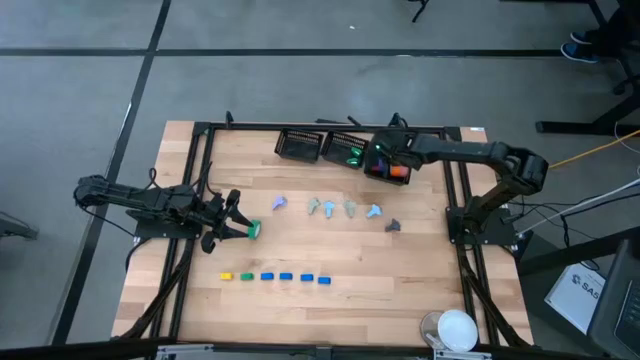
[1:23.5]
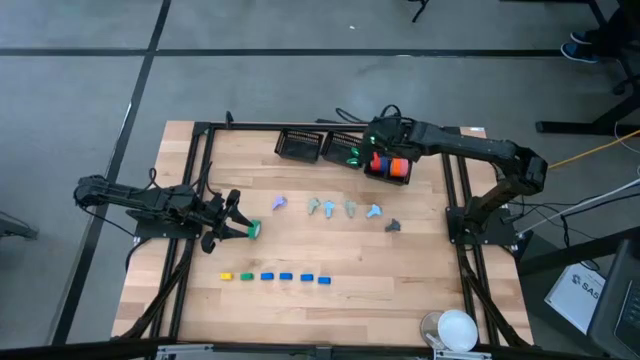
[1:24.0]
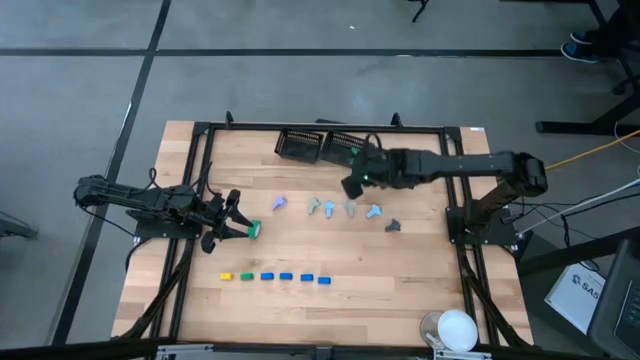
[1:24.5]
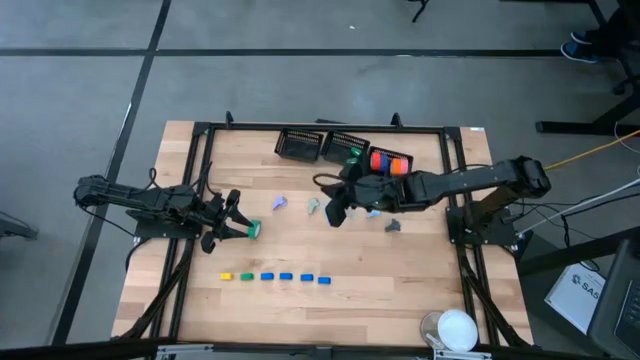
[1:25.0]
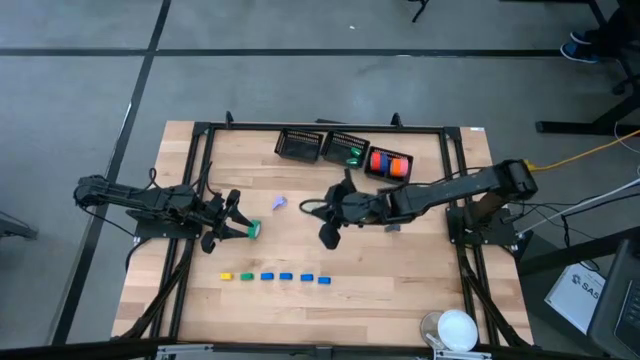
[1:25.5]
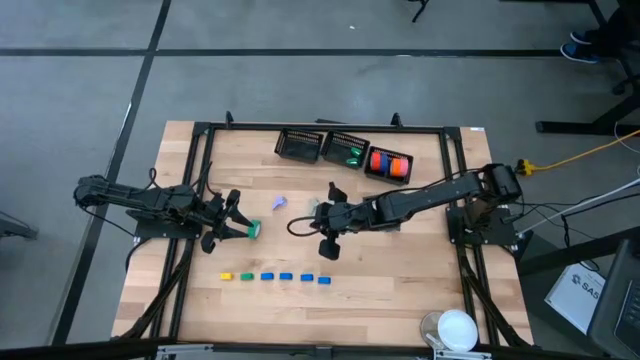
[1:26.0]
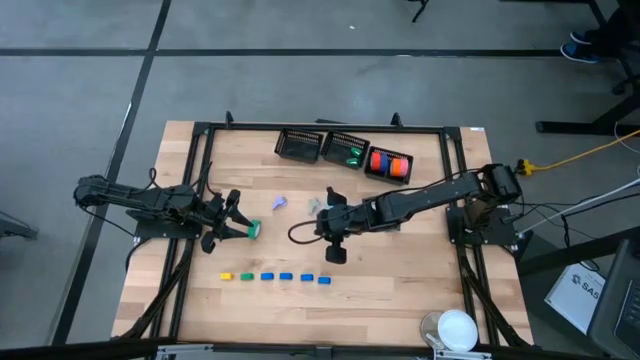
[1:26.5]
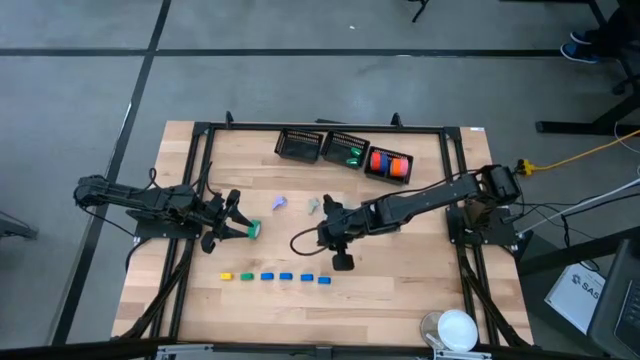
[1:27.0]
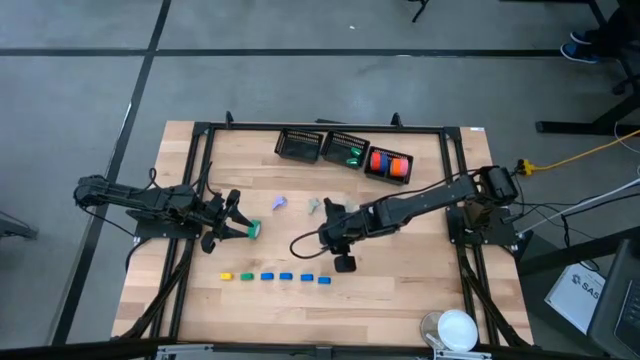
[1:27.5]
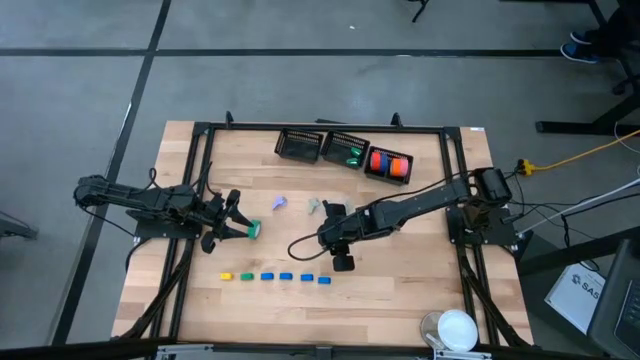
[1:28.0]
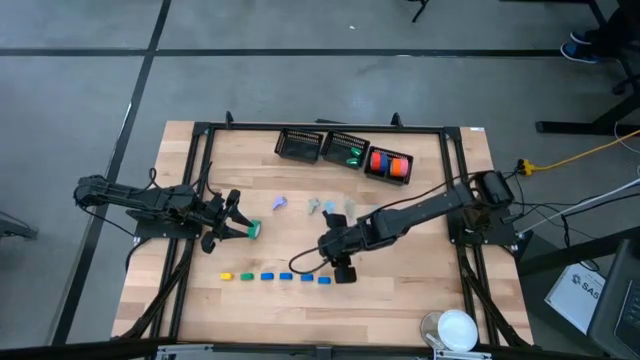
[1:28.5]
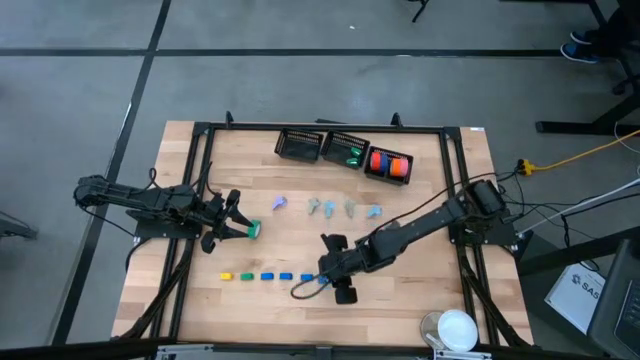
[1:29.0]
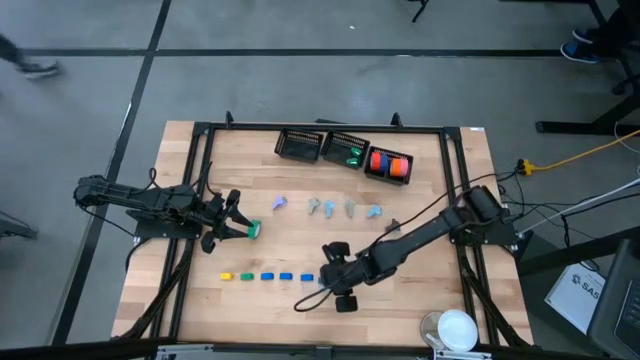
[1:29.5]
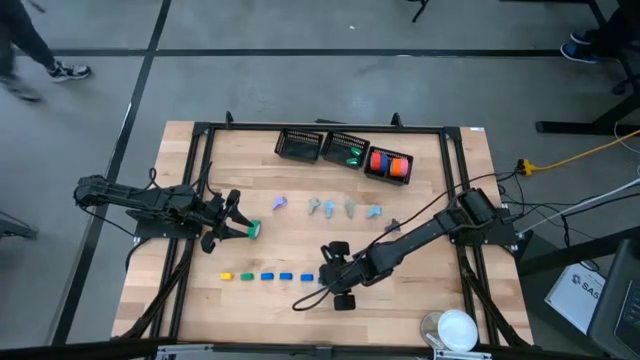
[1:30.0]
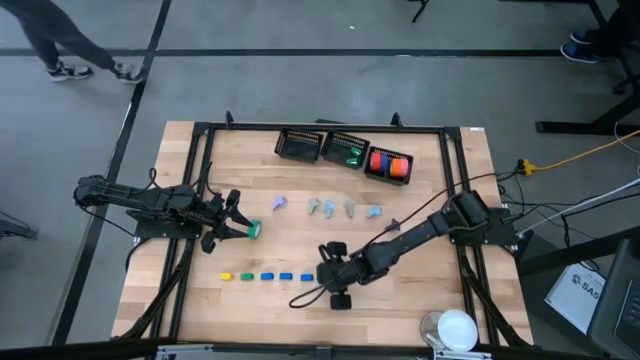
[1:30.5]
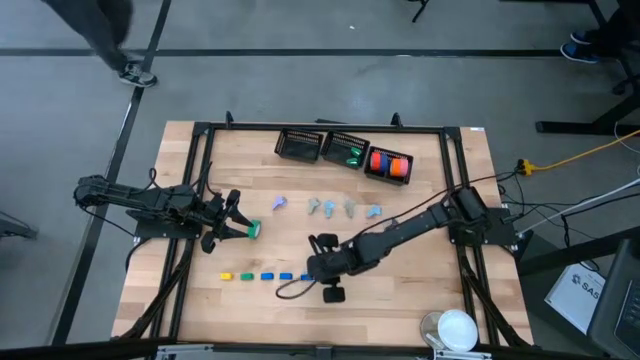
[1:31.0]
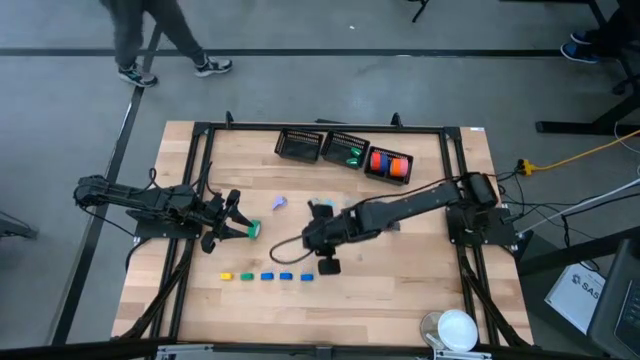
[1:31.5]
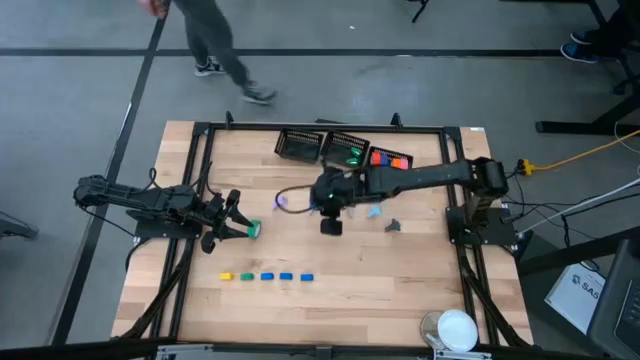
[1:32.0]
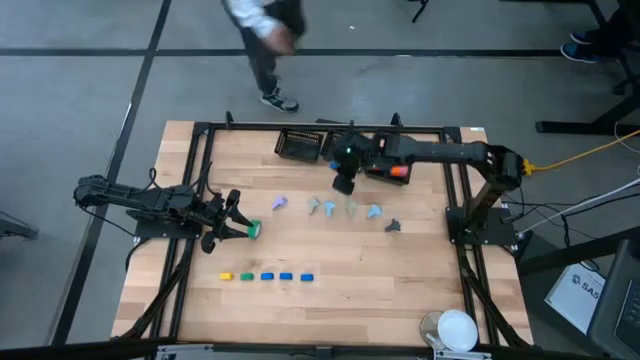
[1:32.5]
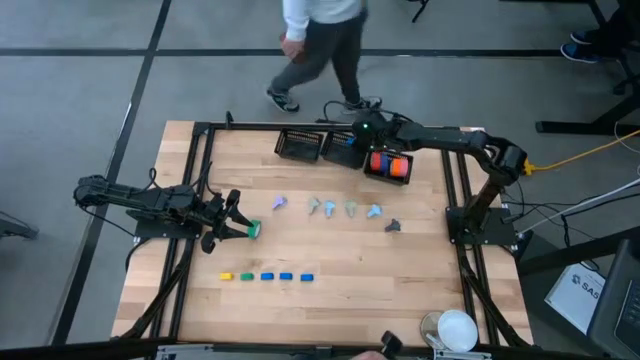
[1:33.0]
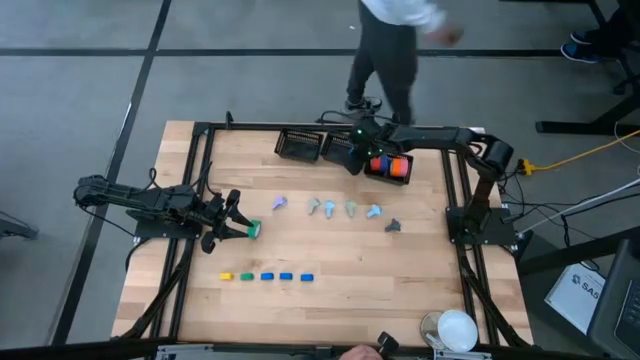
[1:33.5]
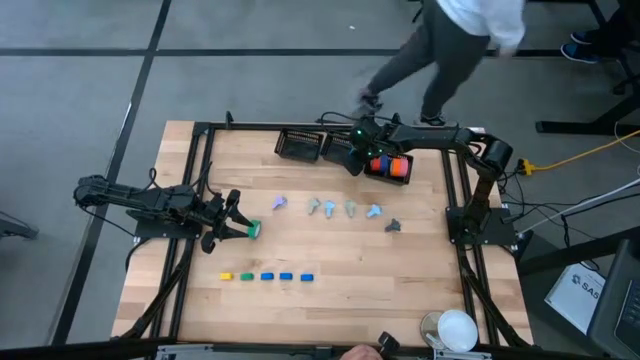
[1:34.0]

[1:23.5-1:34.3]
Task: Pick and place Stapler, Stapler remover, tape
Put the blue stapler into the middle black bin

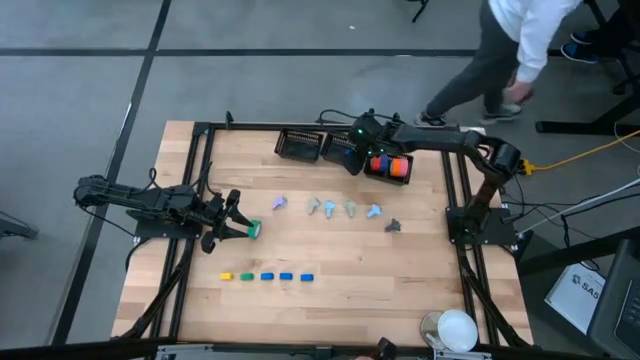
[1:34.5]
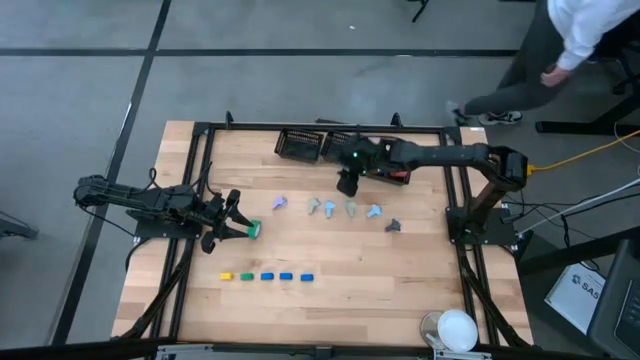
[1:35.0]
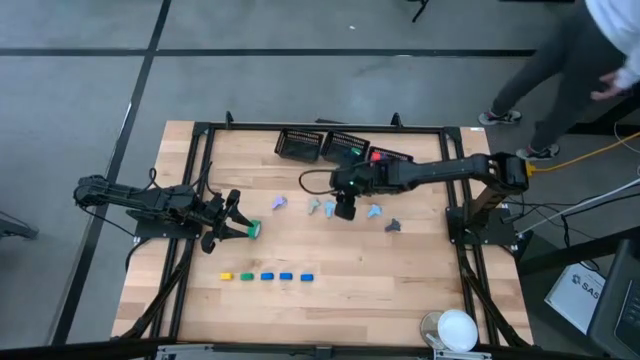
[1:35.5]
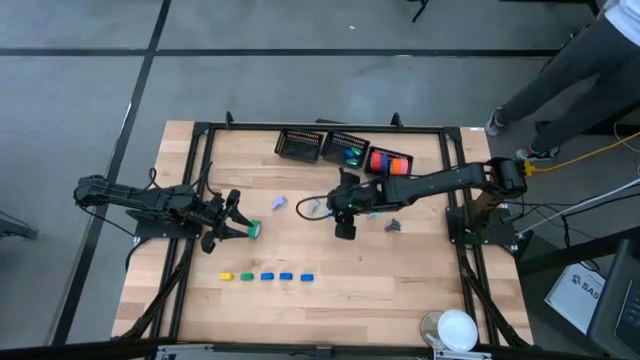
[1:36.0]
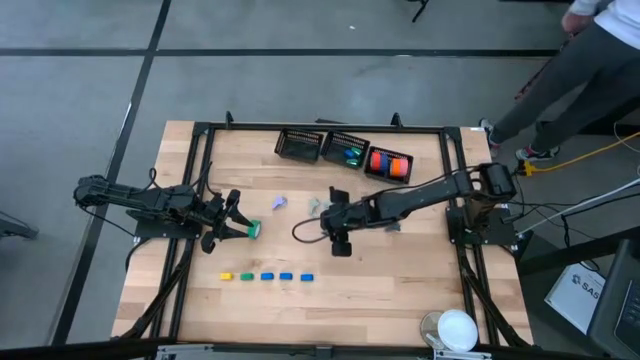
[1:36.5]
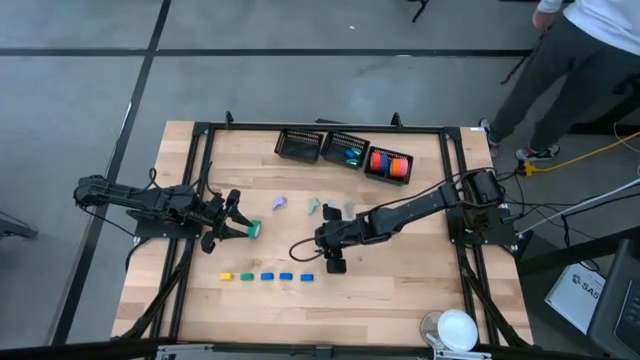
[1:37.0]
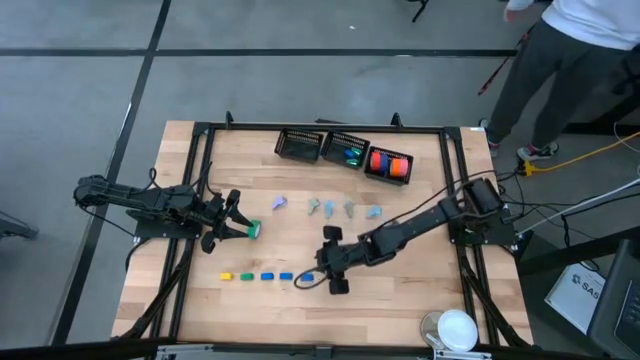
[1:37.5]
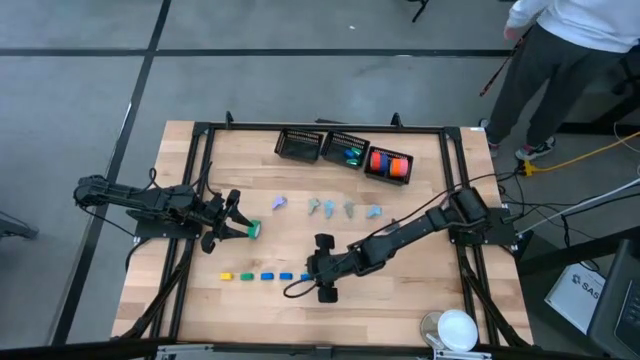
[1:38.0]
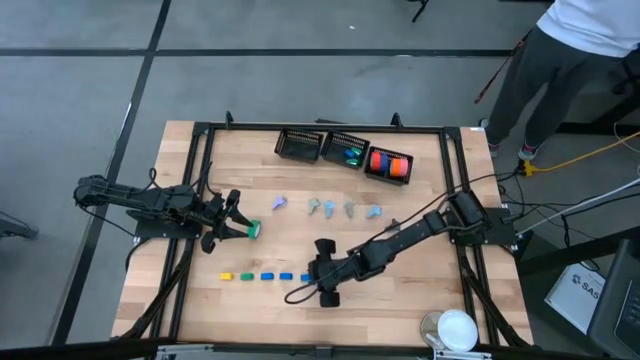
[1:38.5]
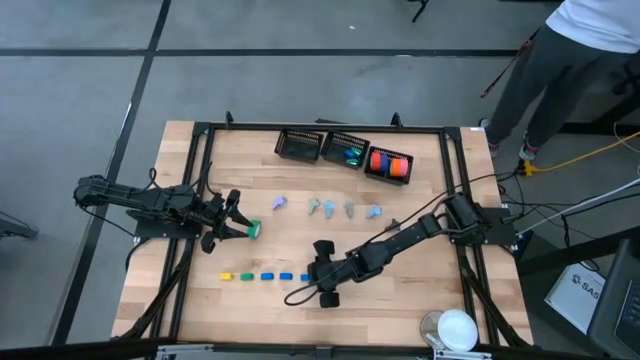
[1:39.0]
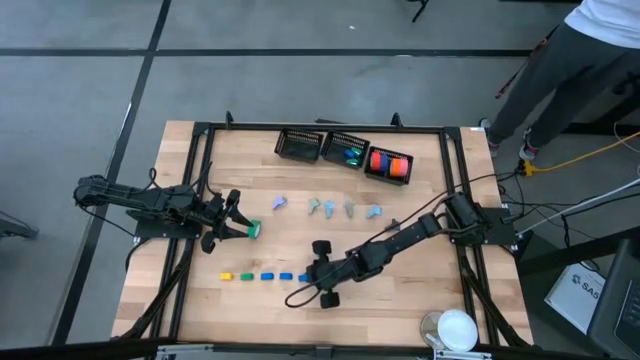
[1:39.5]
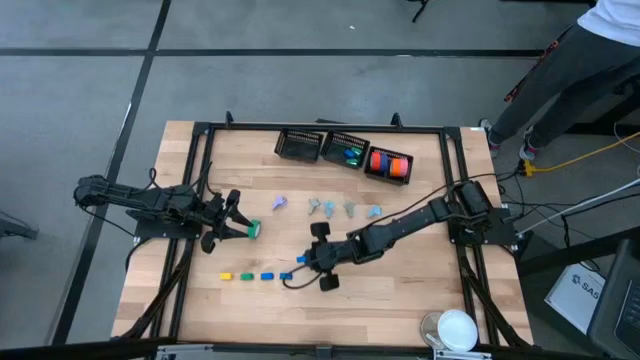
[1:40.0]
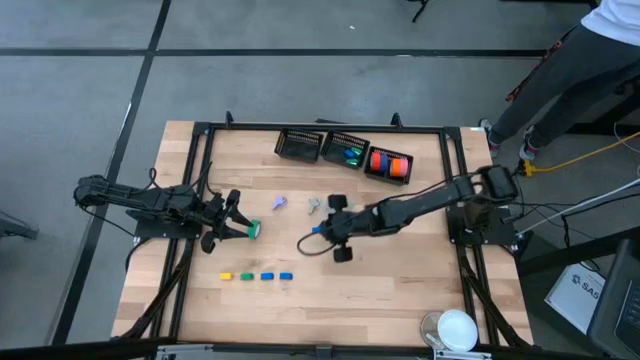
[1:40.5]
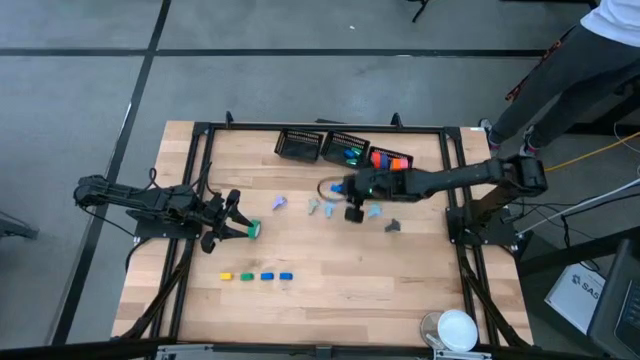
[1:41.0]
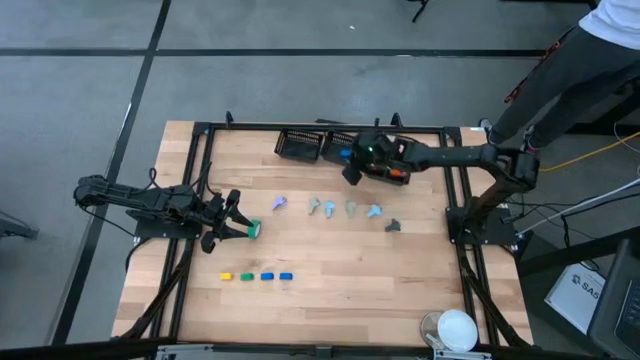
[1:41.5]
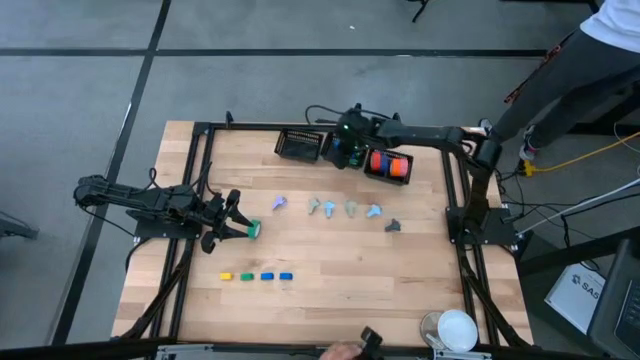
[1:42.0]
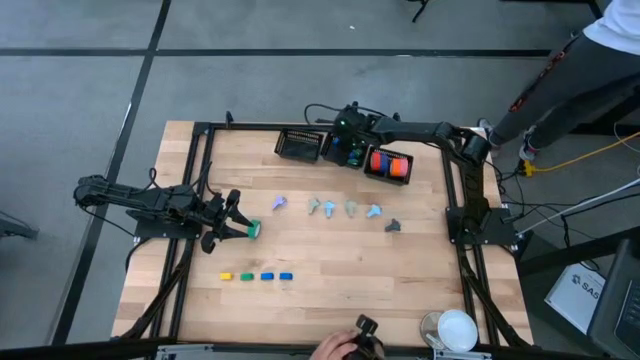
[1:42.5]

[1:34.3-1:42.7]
Put the blue stapler into the middle black bin

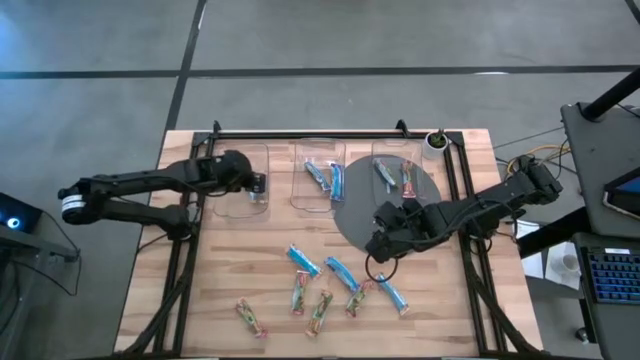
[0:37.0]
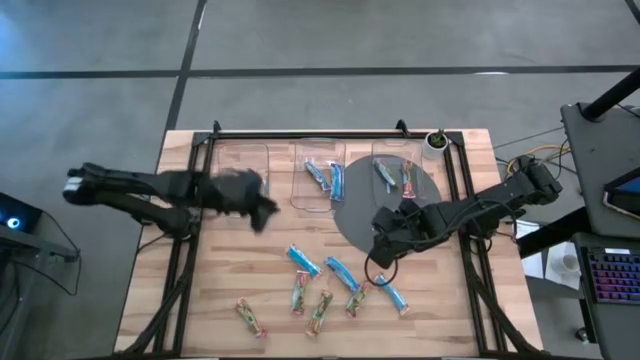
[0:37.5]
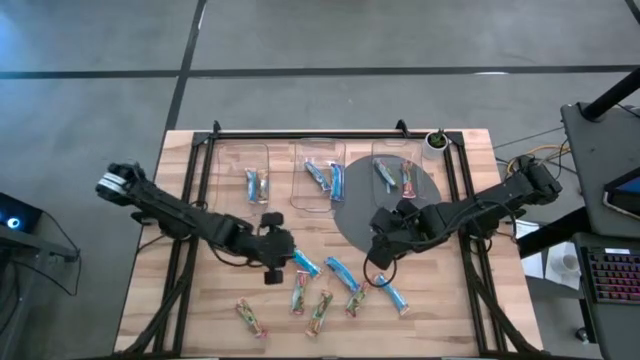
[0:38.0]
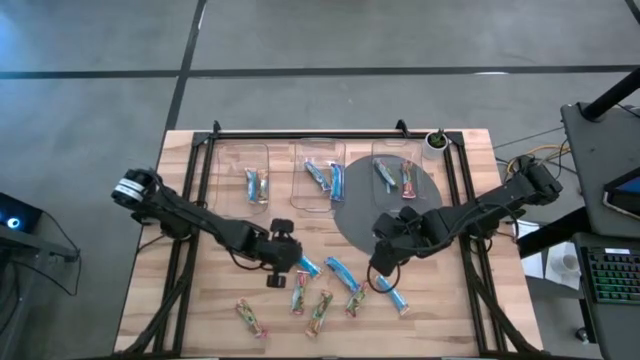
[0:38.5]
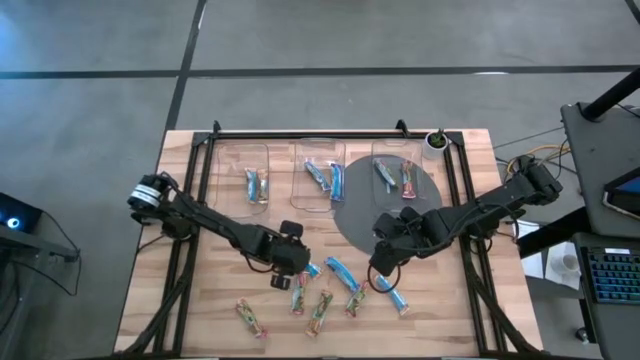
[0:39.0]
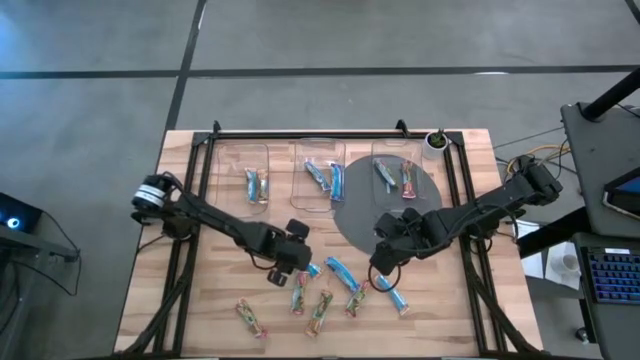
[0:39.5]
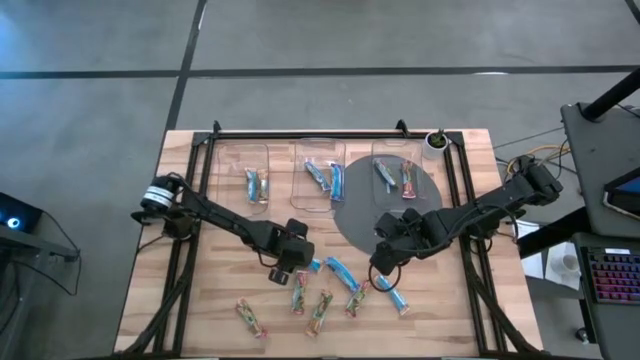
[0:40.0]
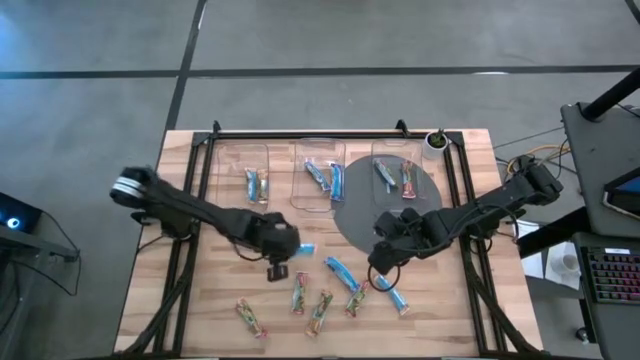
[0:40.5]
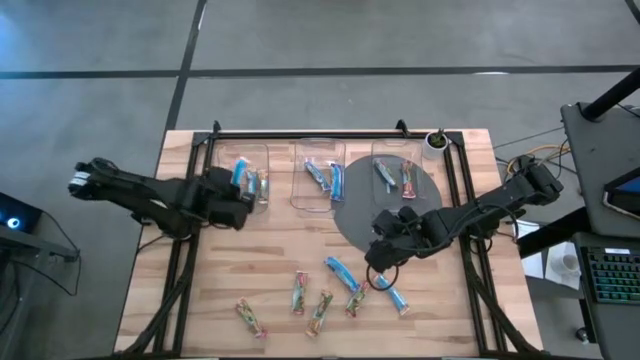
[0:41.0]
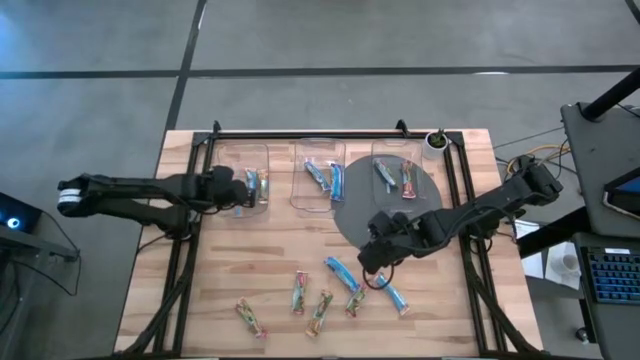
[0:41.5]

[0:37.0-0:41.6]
Task: Pick and place Granola Bars by type
Put the orange granola bar into the left transparent container
